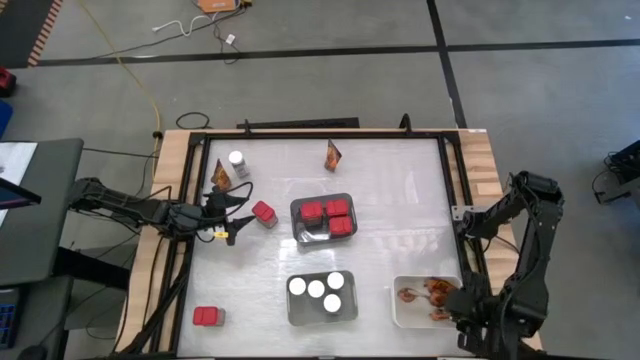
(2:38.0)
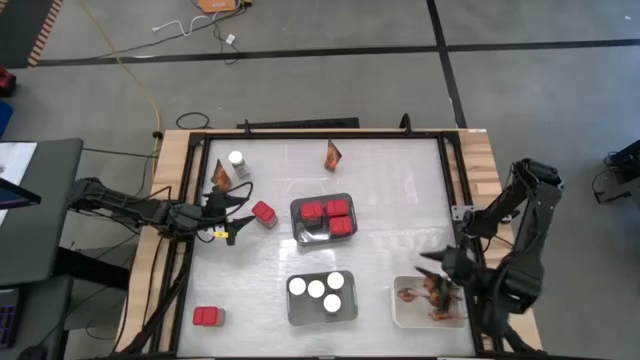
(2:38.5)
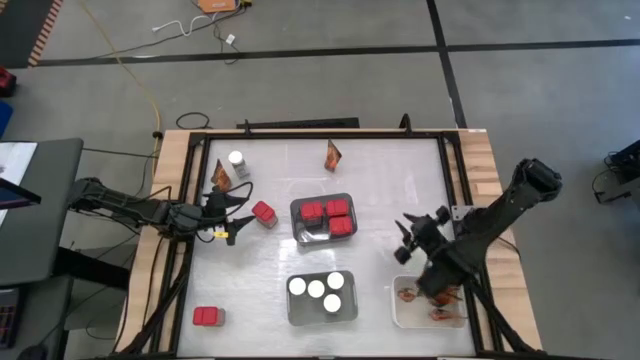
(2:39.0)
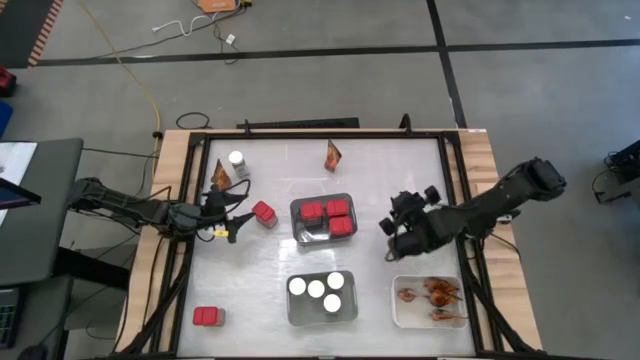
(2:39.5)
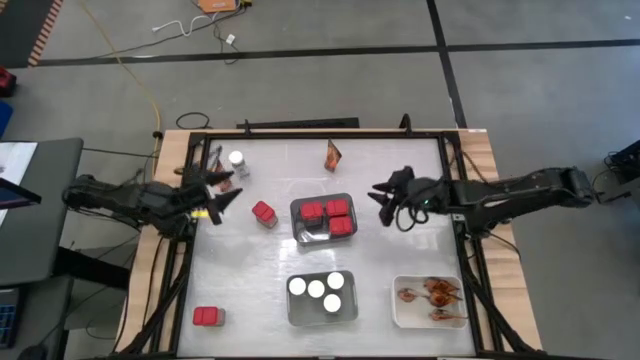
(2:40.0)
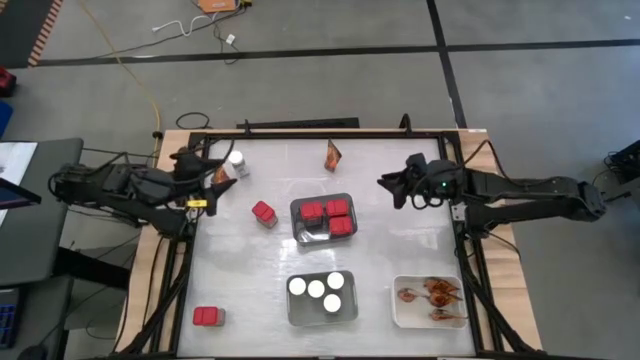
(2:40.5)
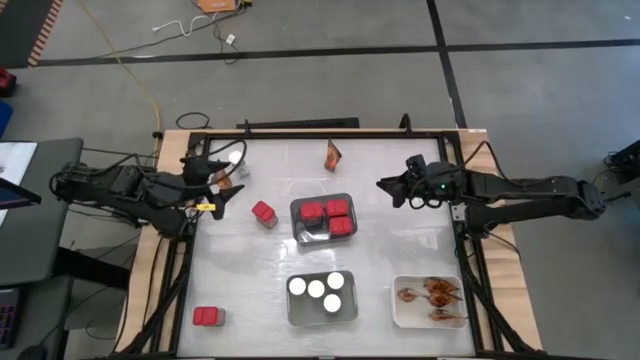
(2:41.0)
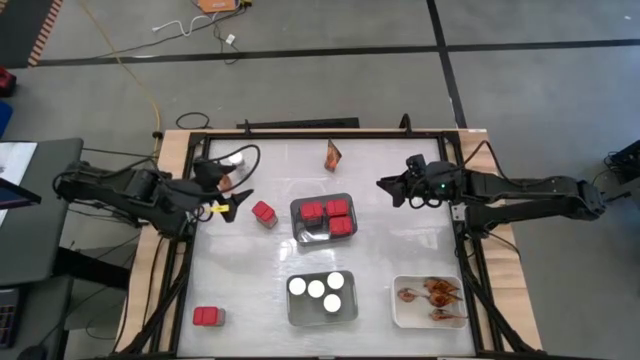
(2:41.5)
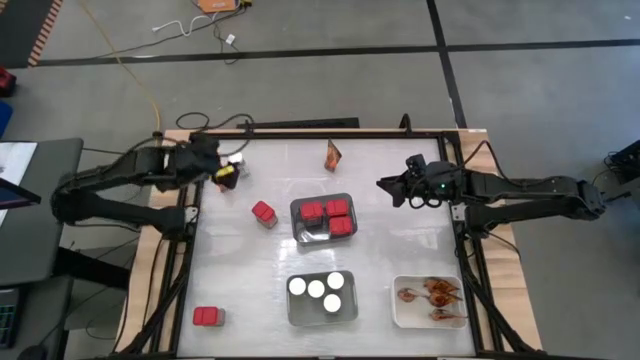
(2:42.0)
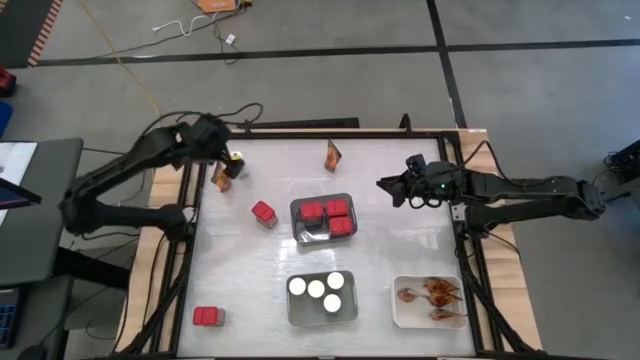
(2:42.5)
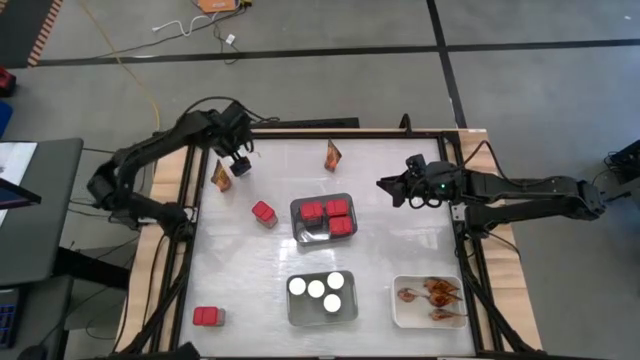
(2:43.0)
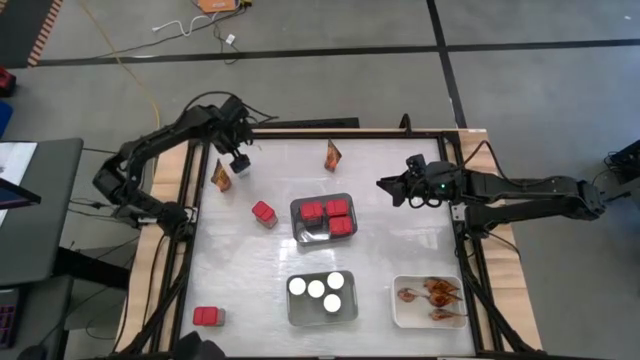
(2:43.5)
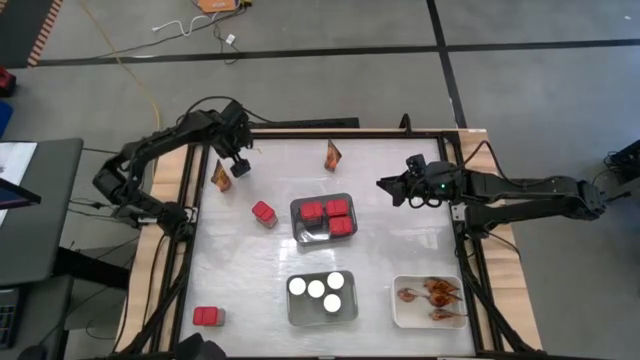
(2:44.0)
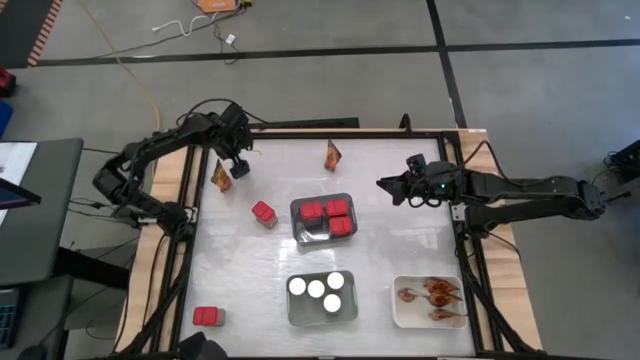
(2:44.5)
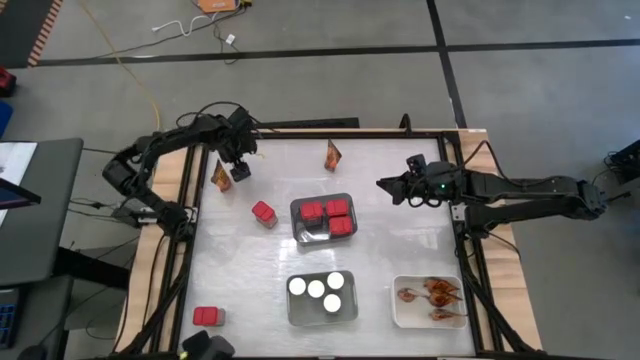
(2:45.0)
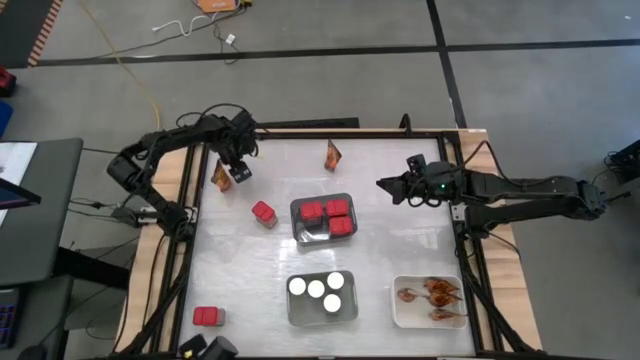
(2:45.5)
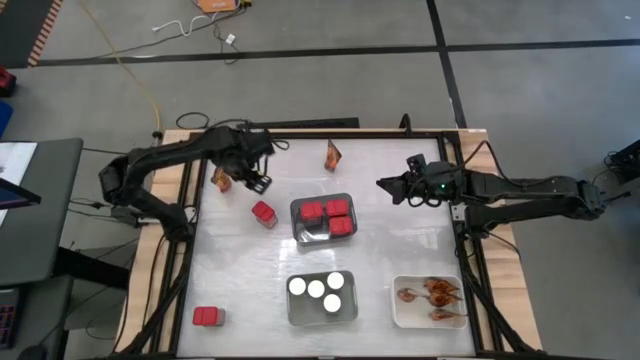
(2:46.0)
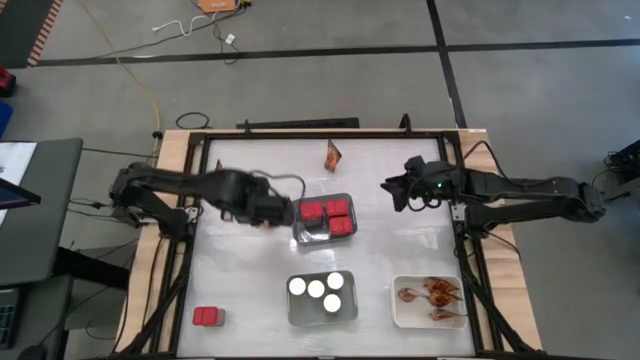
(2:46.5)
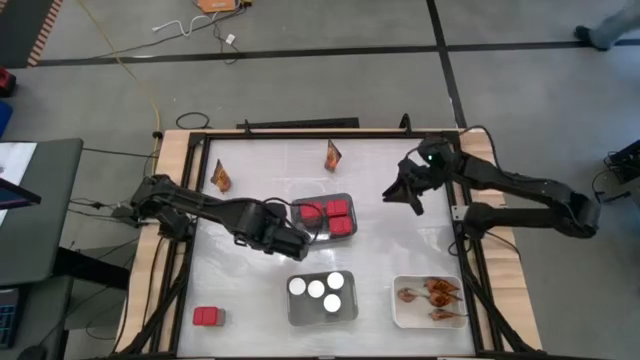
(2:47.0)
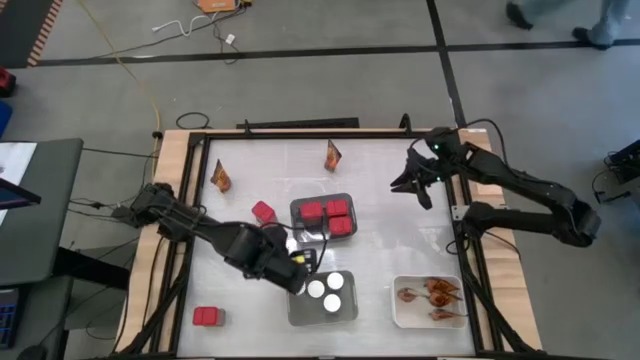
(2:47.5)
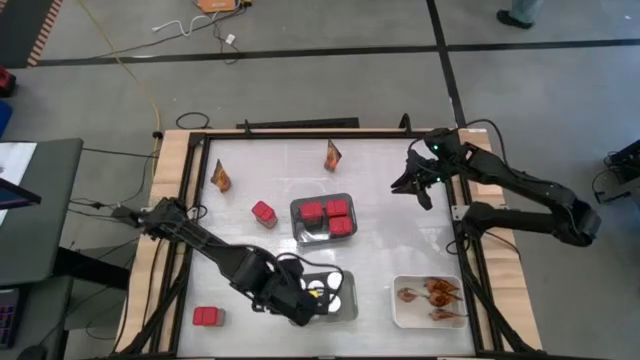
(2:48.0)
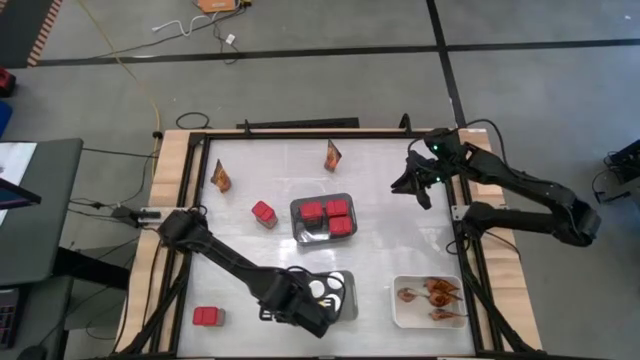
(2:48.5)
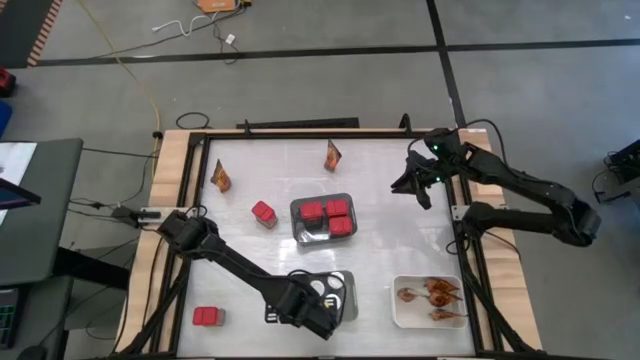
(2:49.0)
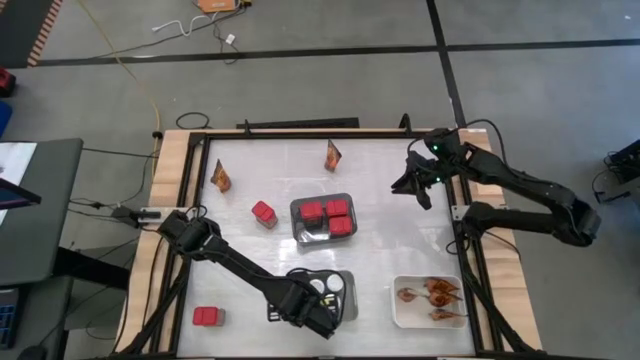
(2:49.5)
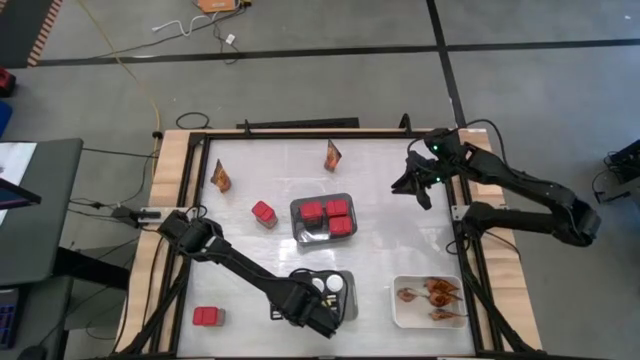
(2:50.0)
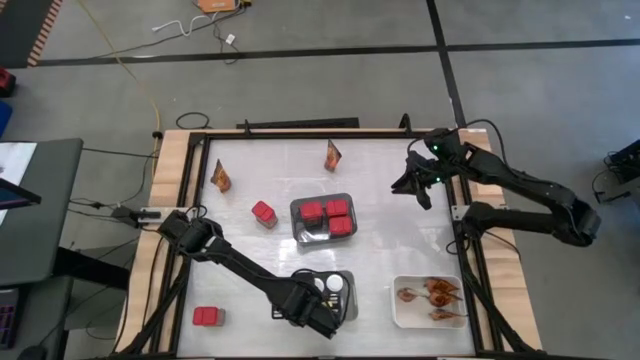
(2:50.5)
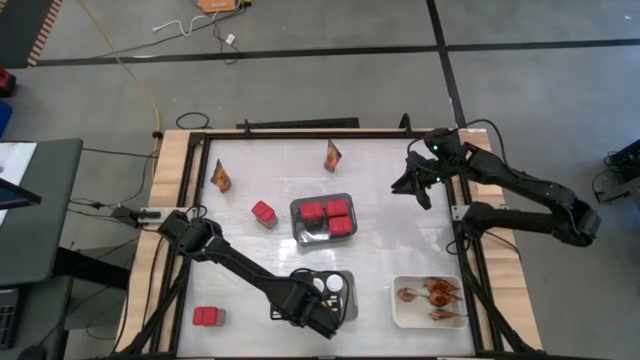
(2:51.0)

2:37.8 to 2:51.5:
Task: Sort spices by type
Put the white seasoning bottle into the gray bin

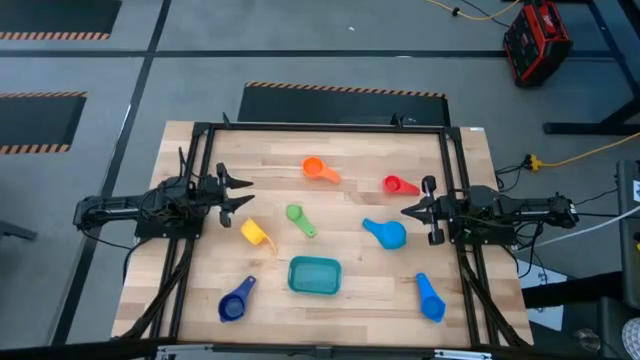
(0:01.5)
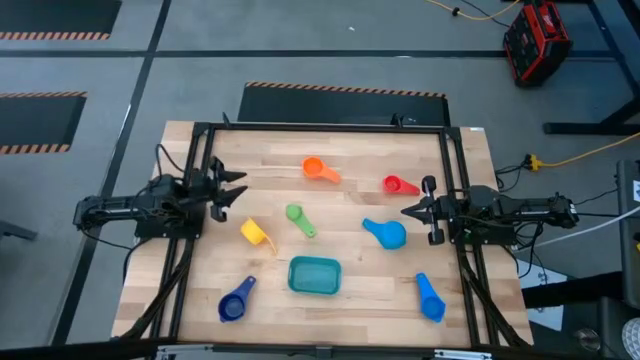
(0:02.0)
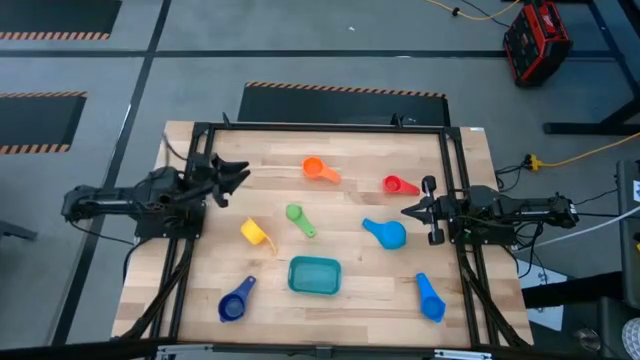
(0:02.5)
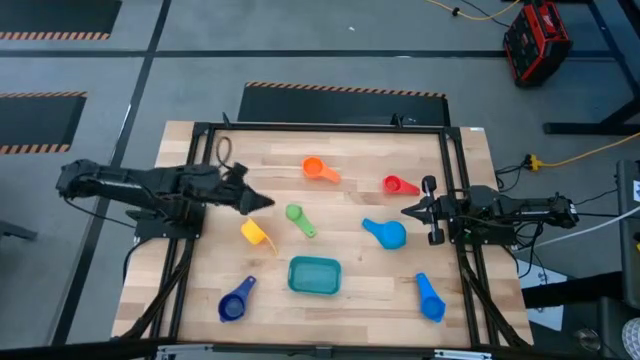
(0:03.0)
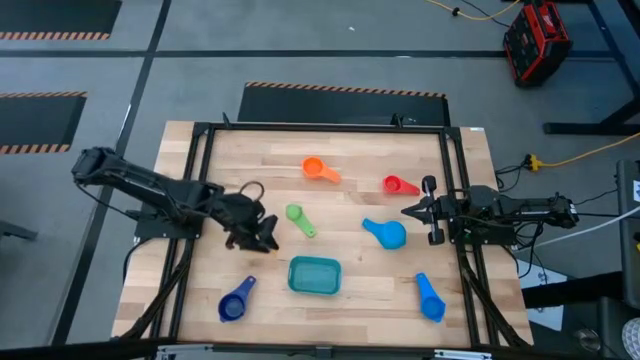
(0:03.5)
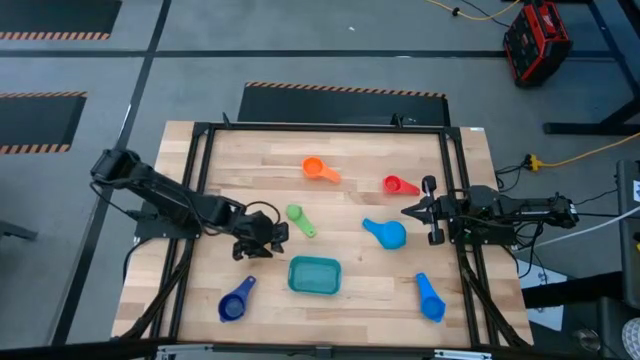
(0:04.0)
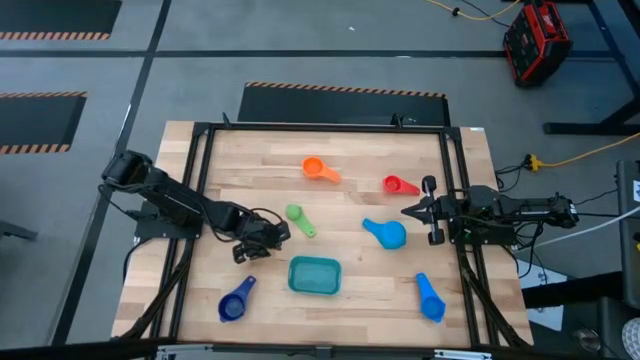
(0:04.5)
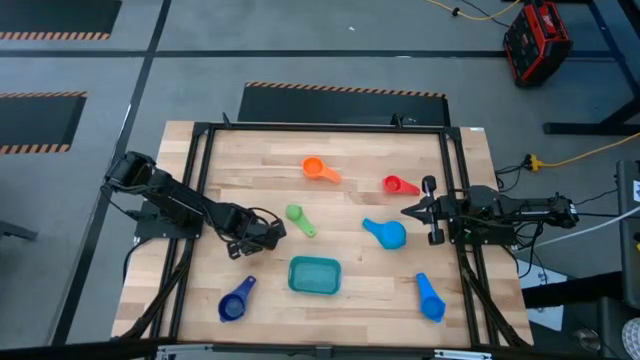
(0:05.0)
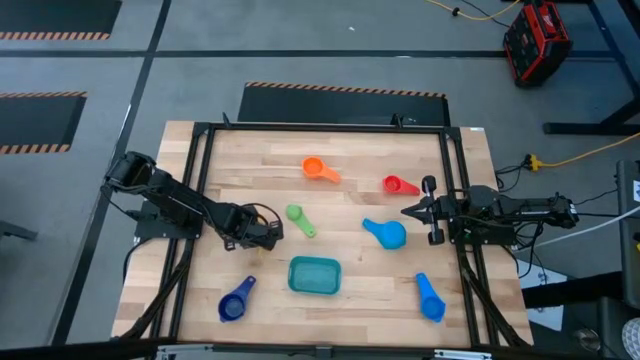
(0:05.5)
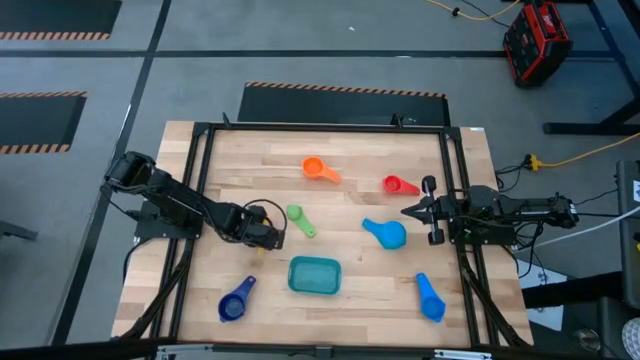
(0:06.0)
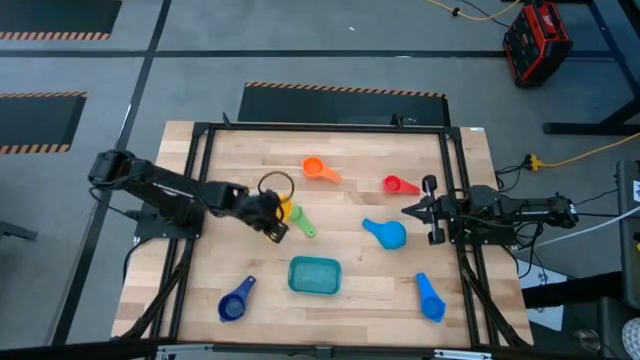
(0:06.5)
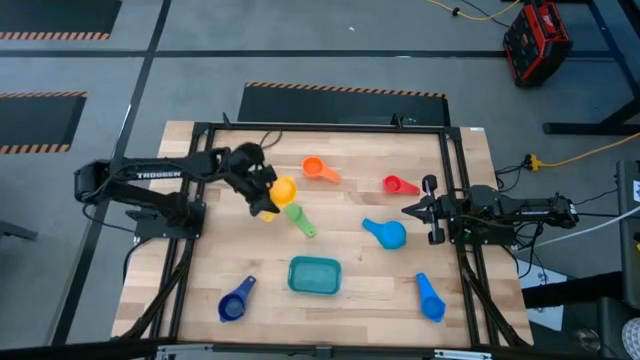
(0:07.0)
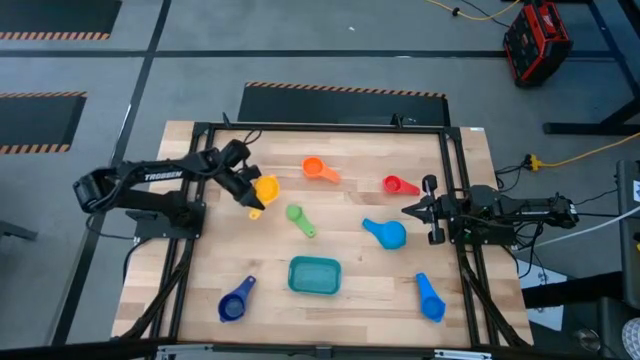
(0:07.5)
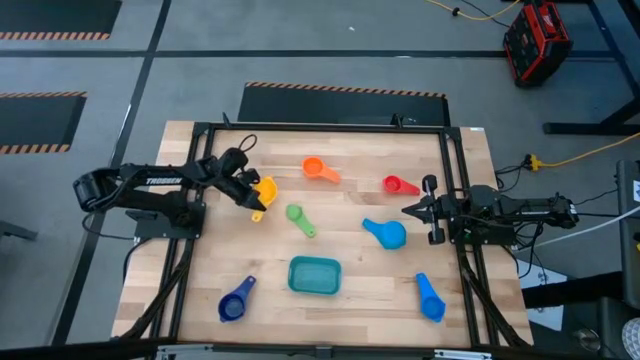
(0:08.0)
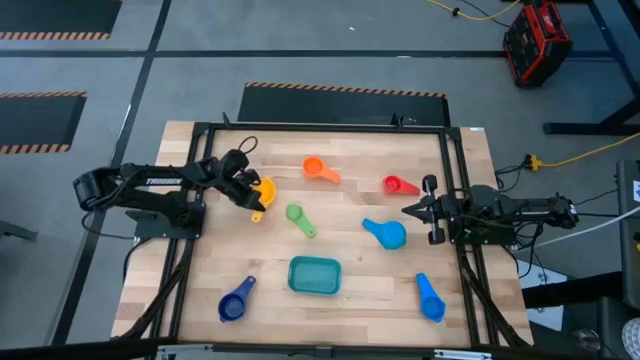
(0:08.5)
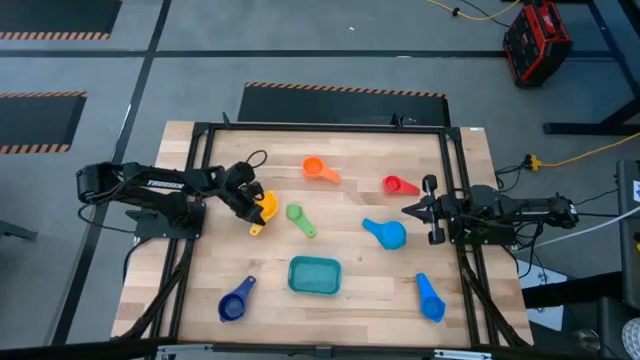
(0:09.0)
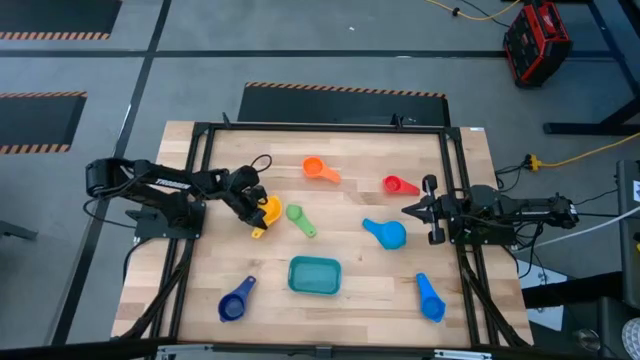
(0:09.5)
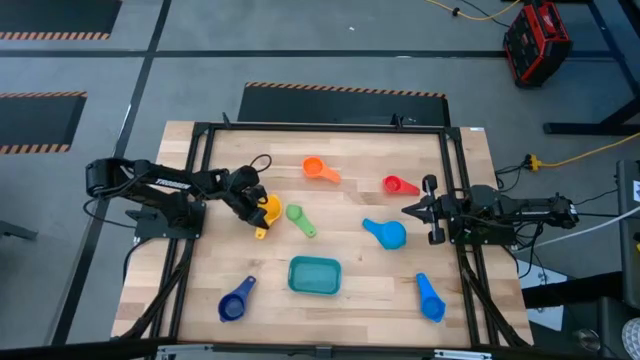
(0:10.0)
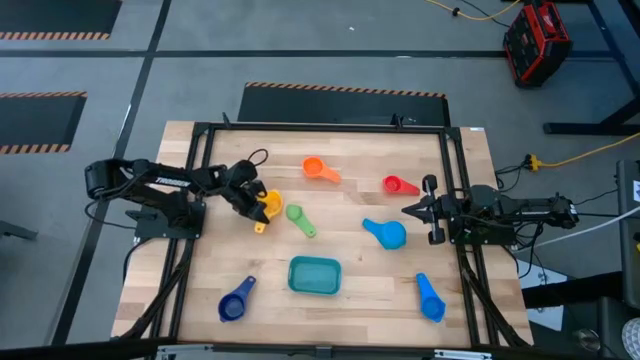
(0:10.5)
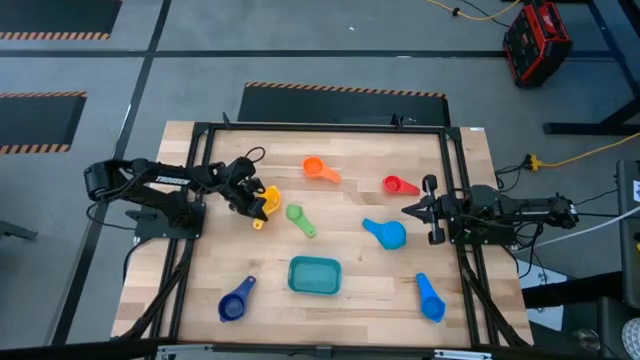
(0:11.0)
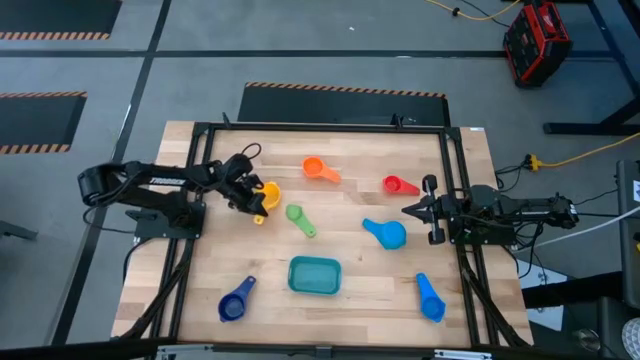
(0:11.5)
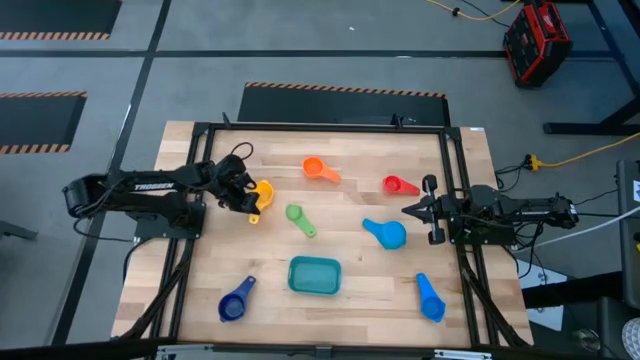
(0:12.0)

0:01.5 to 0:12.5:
Task: Nest measuring cups in basket
Prepare the yellow measuring cup
